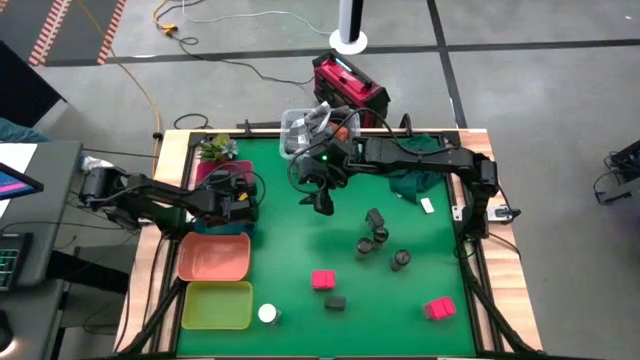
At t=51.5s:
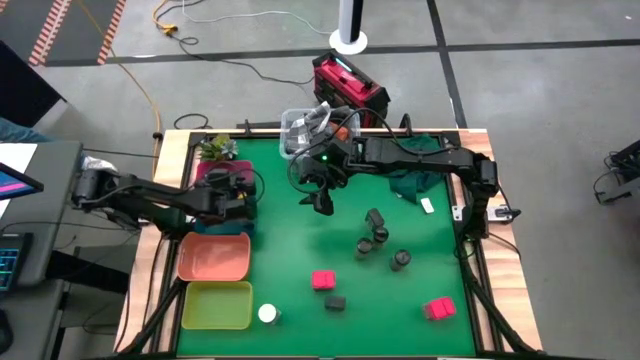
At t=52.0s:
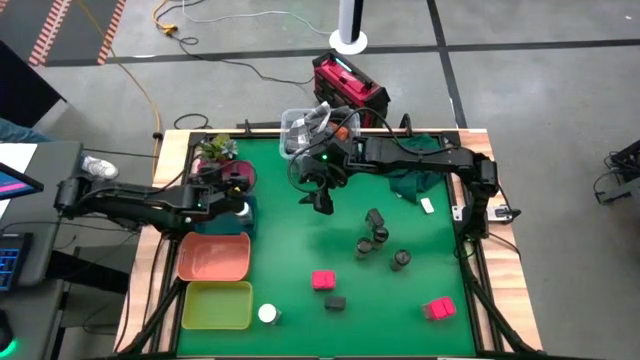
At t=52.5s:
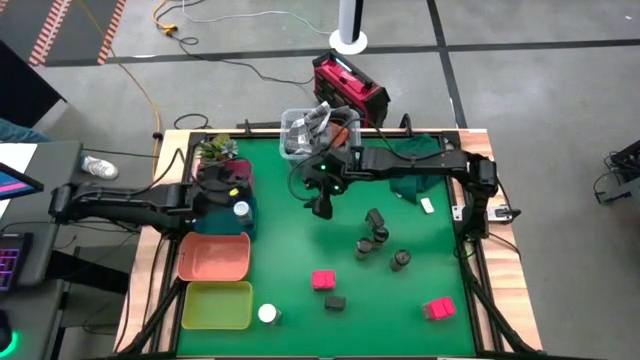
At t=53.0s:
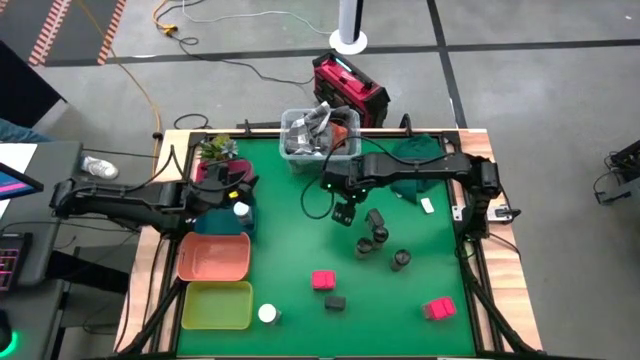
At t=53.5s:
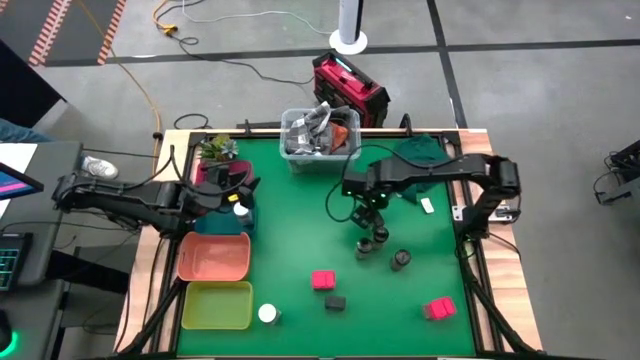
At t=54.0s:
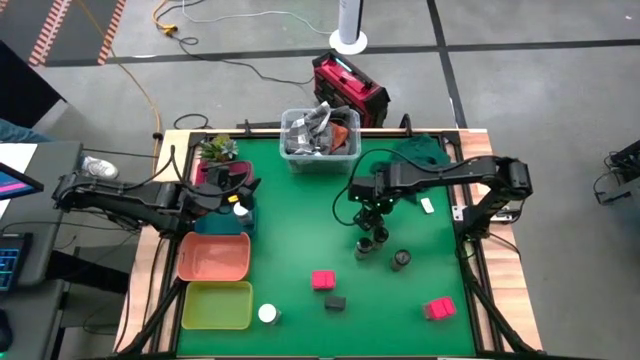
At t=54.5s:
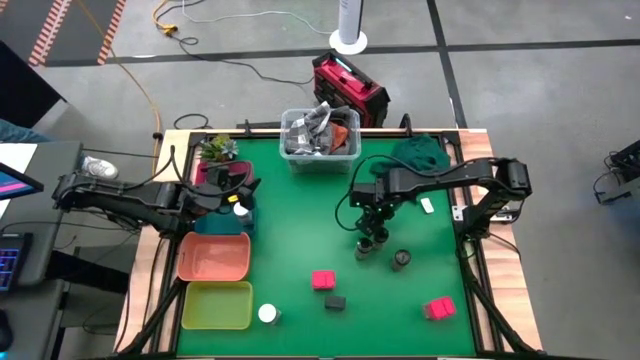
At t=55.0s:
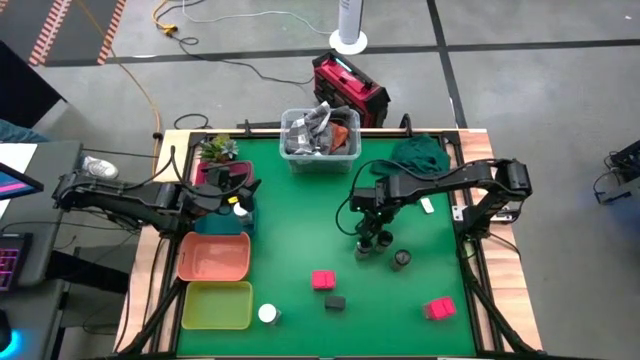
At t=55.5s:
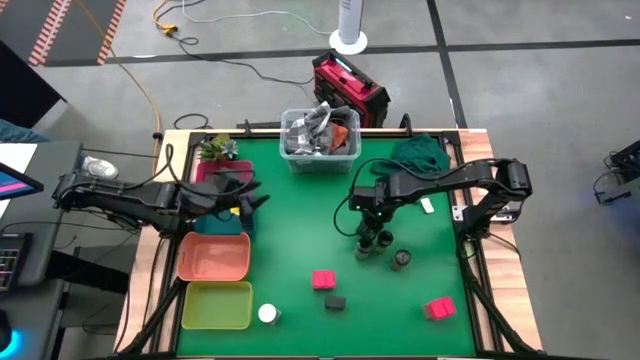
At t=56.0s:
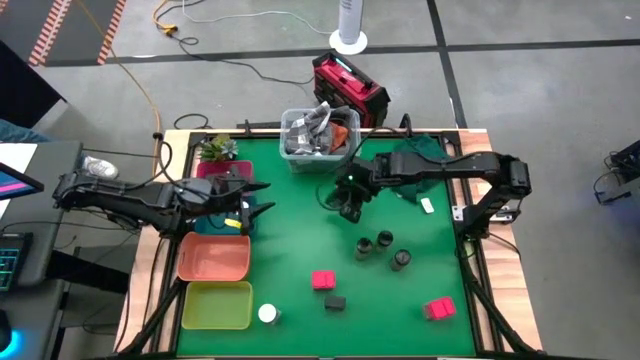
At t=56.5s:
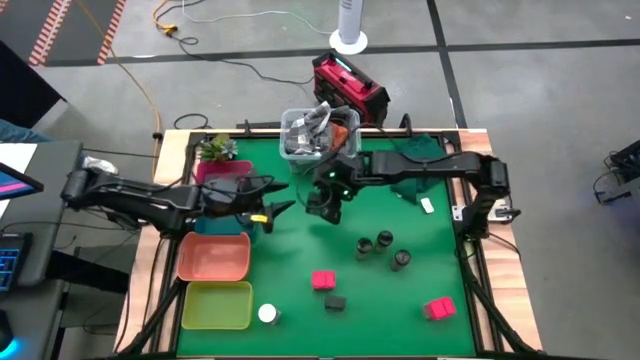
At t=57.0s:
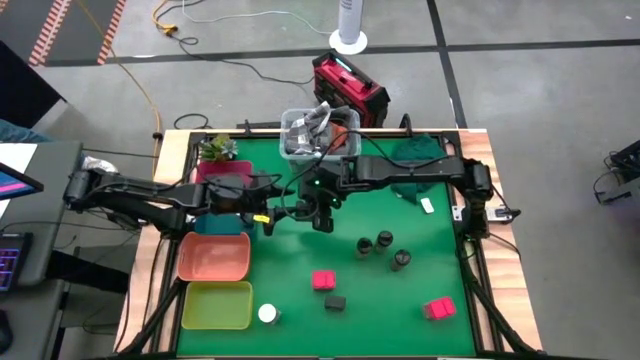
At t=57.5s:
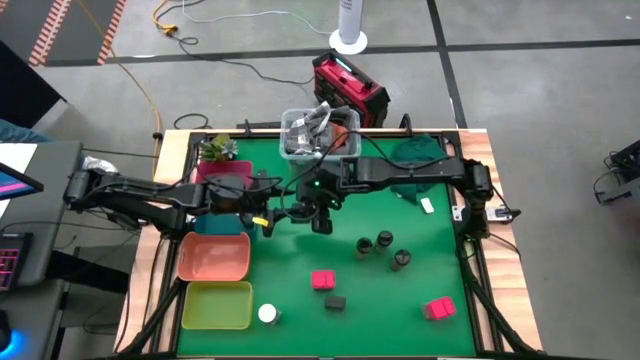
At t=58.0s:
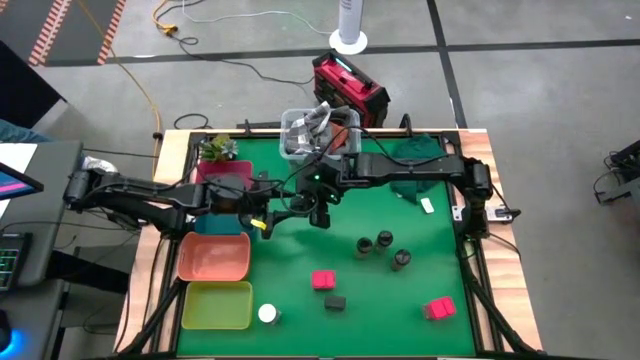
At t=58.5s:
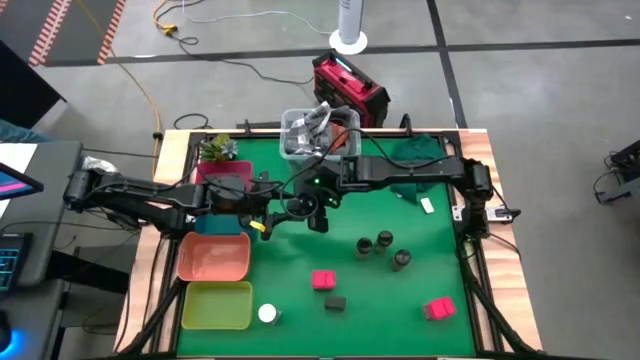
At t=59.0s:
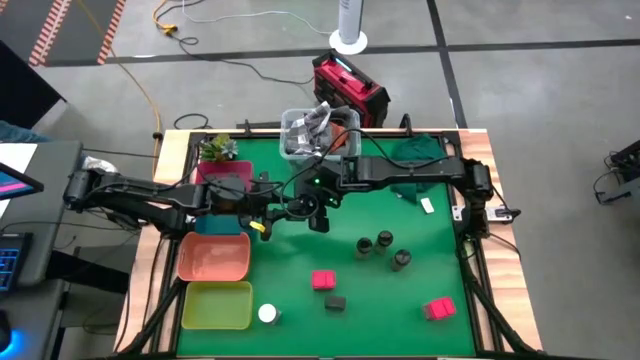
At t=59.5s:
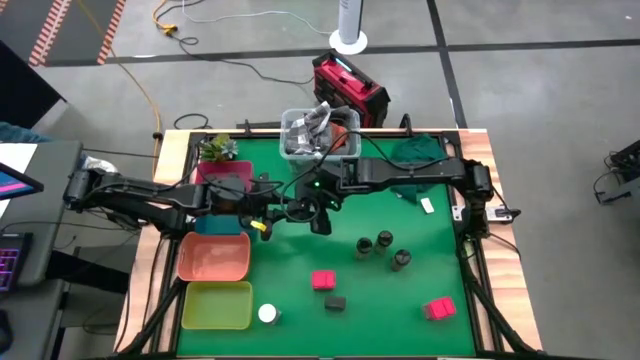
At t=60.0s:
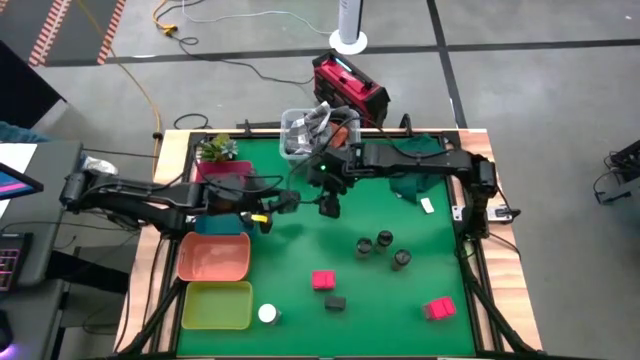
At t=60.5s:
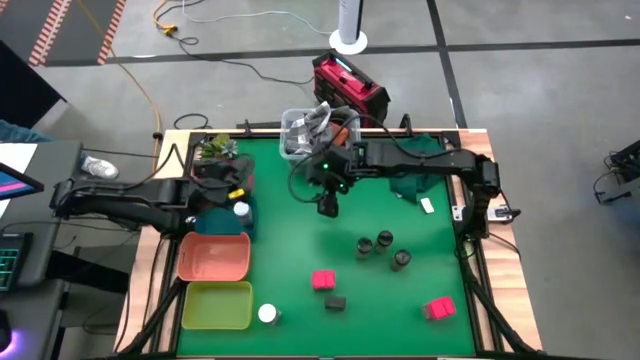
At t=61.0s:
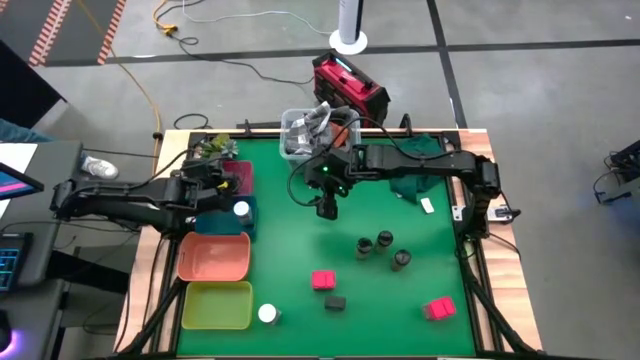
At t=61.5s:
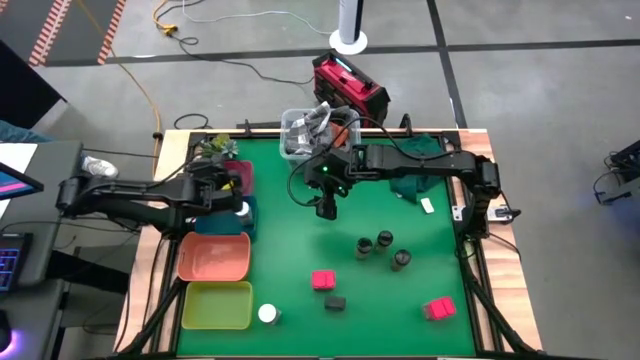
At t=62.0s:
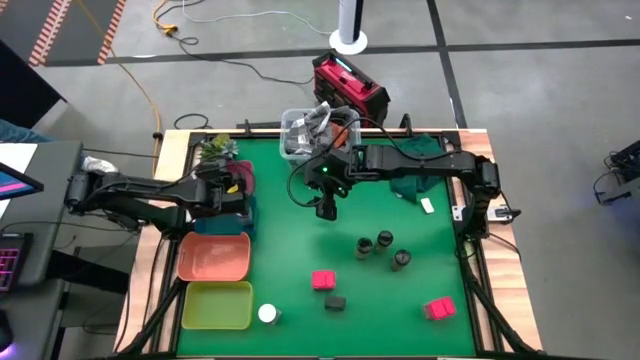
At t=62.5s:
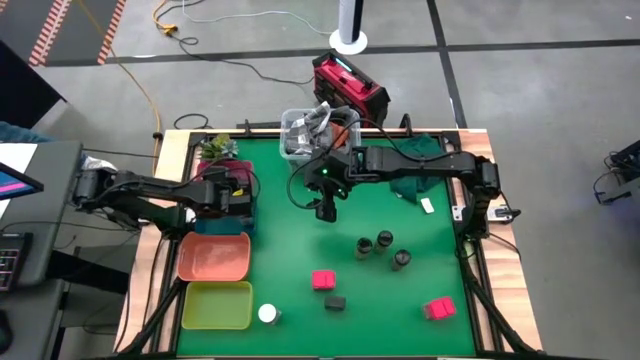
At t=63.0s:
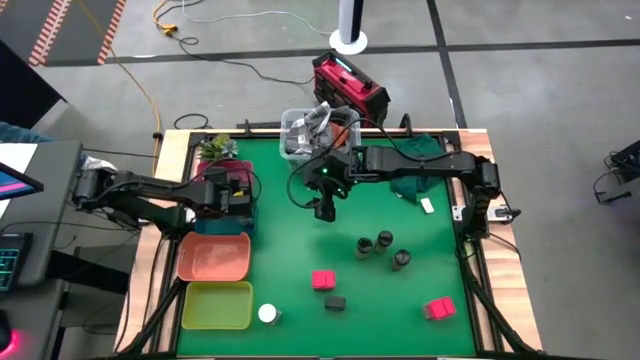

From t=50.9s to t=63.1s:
Task: Sort spices by type
Put the top green seasoning can into the red bin

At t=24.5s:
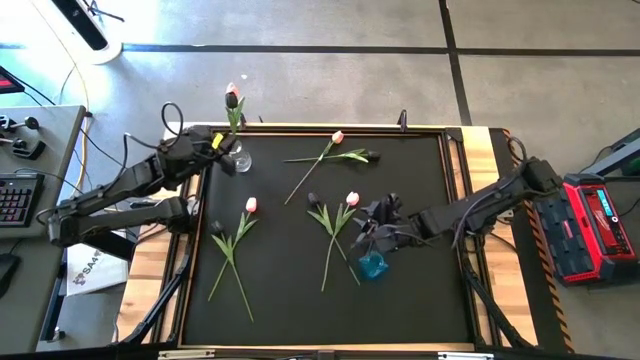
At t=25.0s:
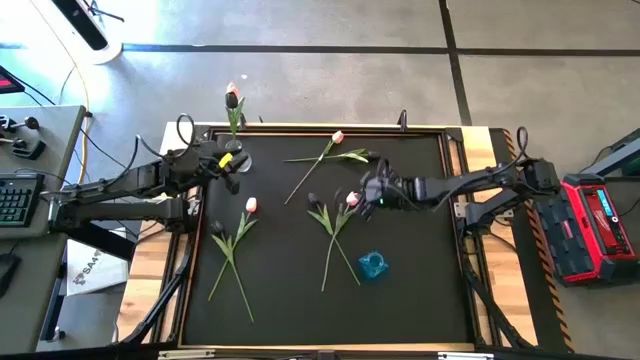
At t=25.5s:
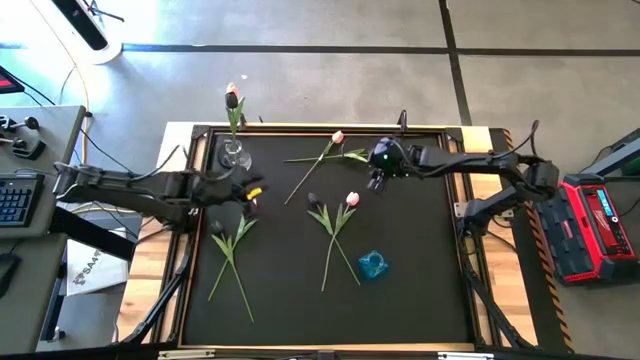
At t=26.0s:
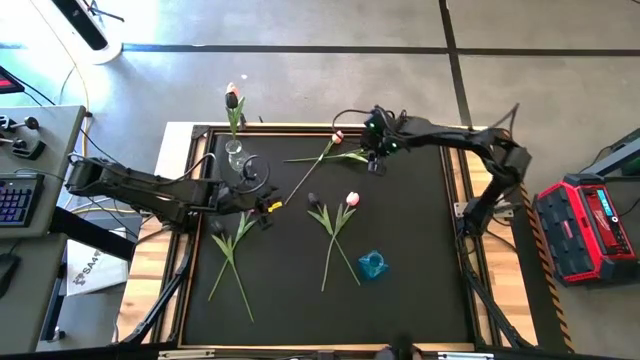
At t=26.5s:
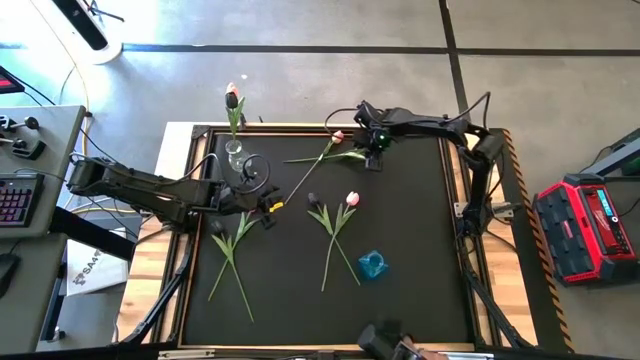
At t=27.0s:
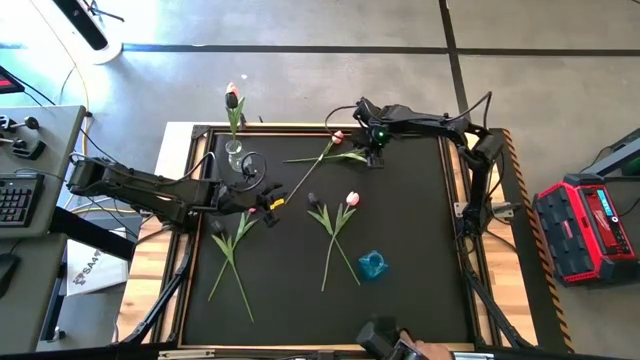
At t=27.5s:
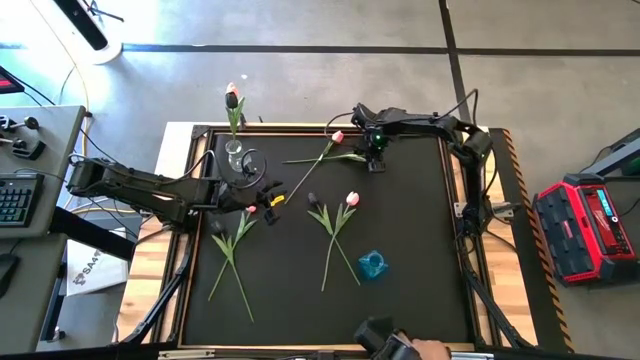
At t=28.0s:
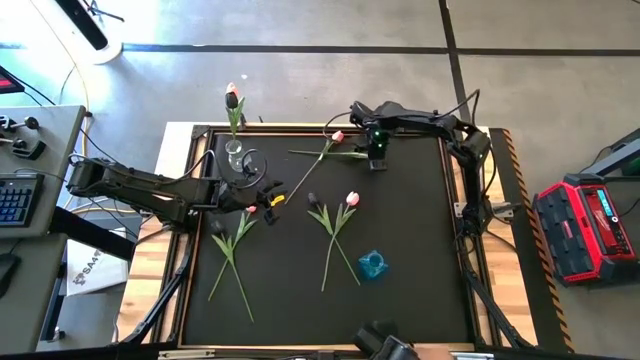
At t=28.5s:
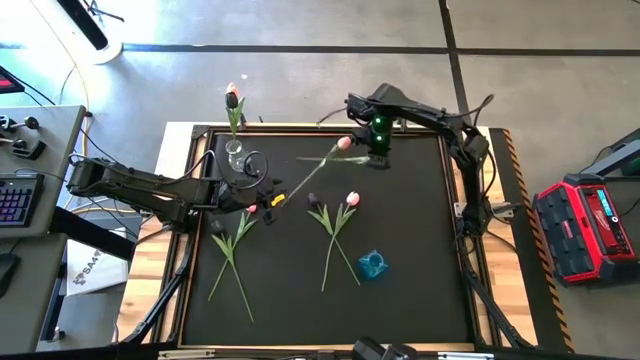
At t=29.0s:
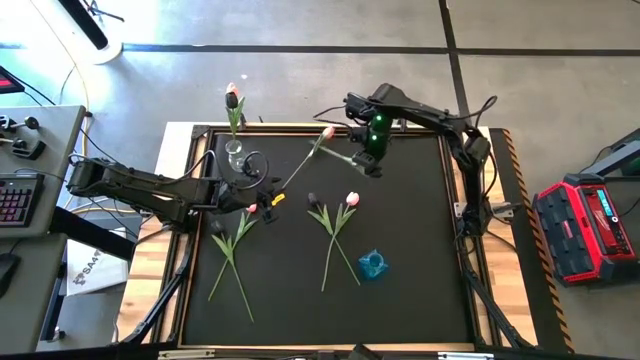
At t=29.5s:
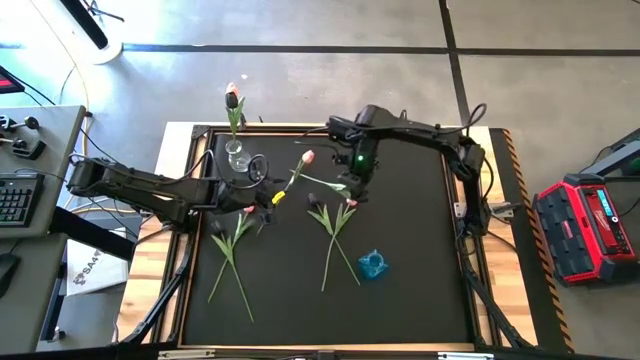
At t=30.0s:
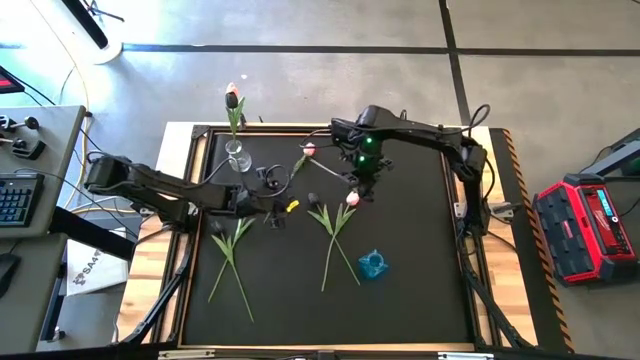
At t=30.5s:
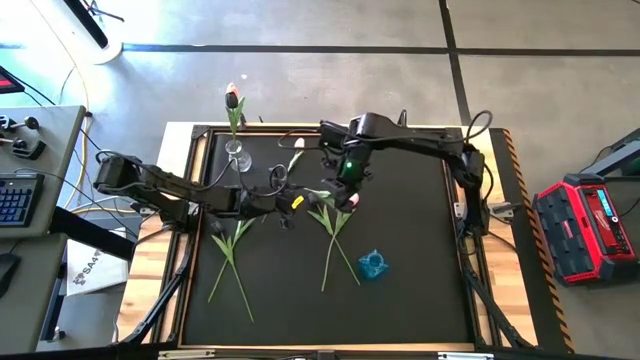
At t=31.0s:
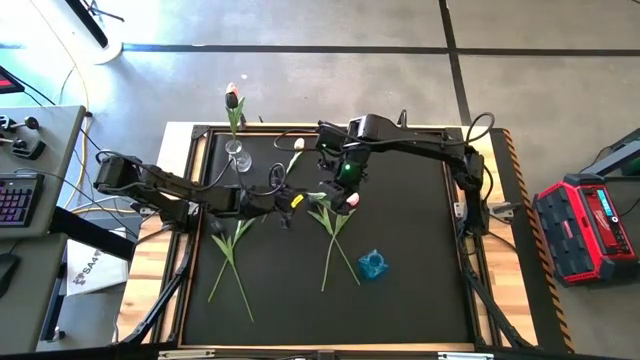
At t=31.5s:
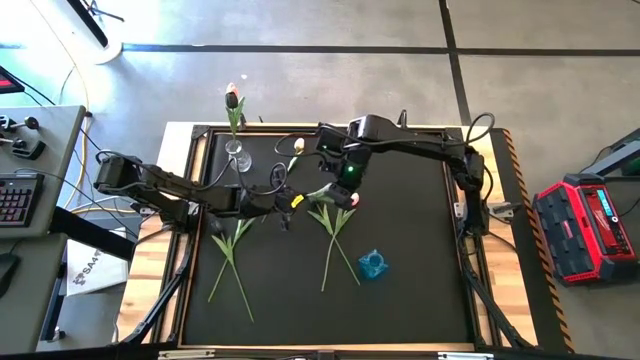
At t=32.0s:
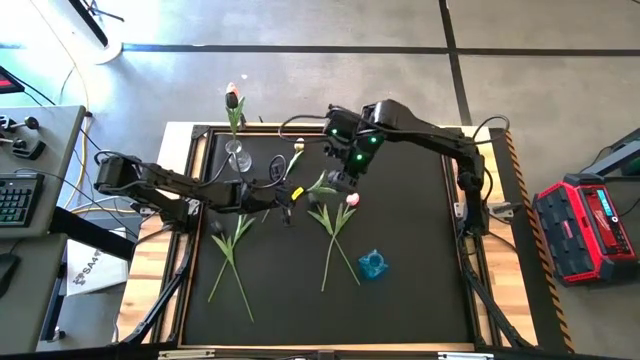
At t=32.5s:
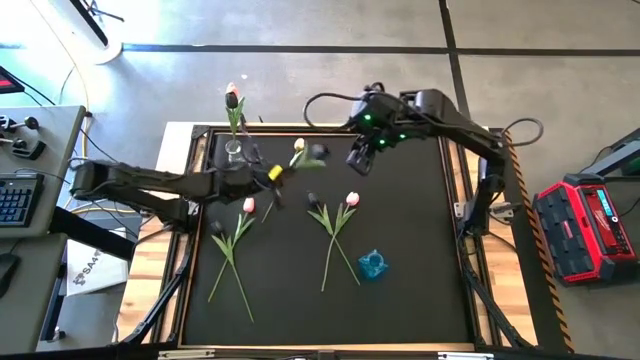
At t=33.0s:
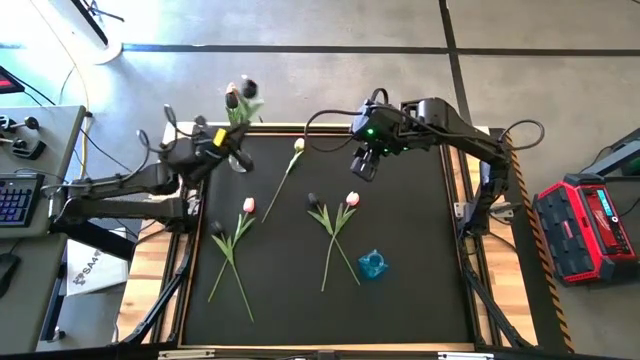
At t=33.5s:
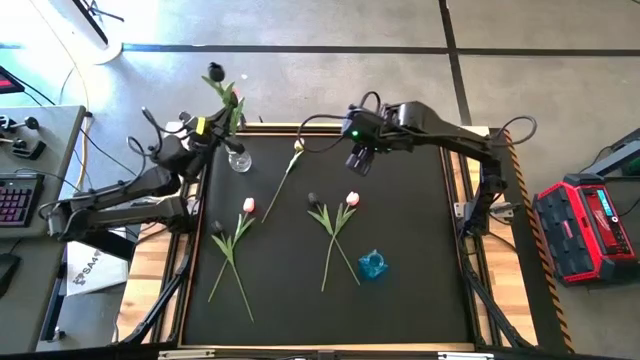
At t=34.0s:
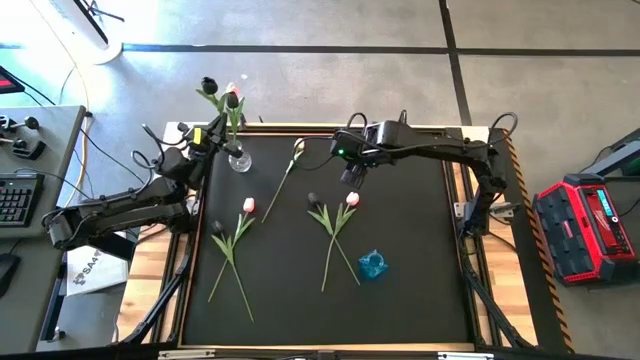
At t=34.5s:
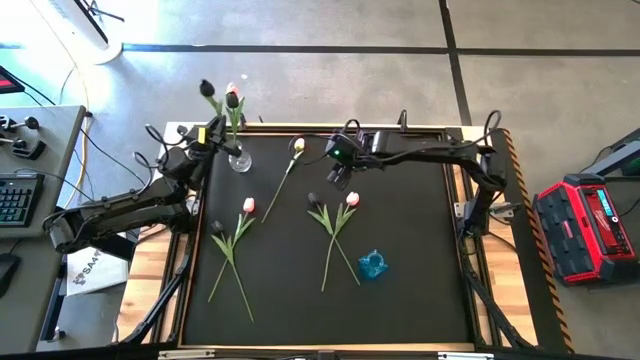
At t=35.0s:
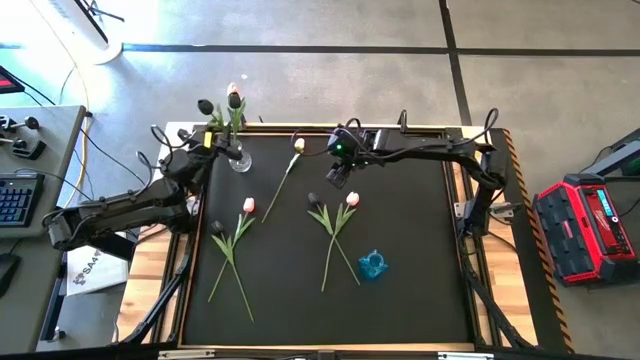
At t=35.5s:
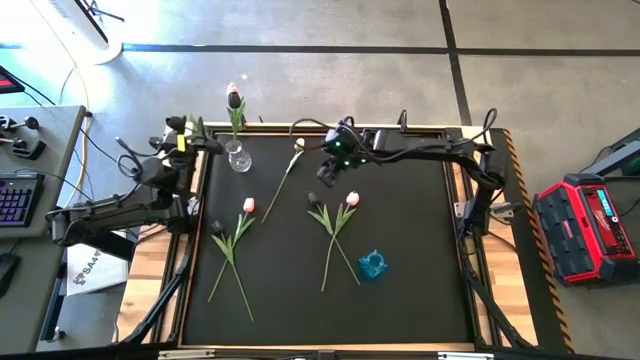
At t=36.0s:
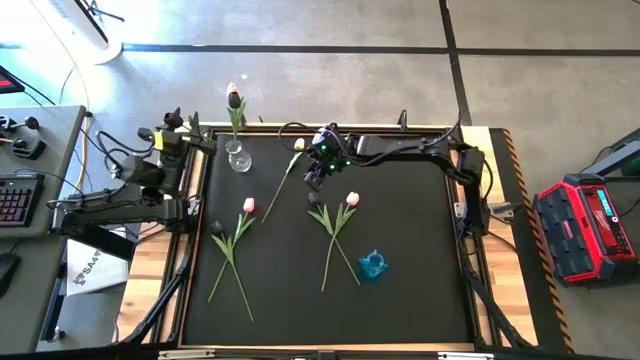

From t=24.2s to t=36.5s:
Task: Sort flowers into vase by color
Put the top right black flower into the transparent vase
